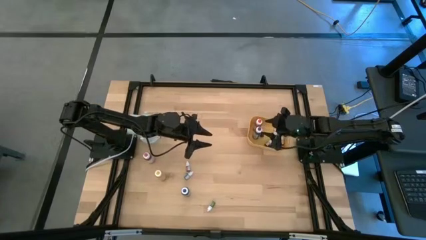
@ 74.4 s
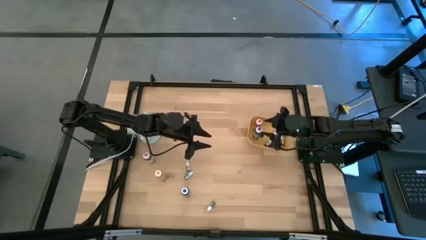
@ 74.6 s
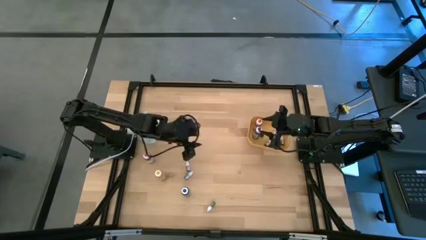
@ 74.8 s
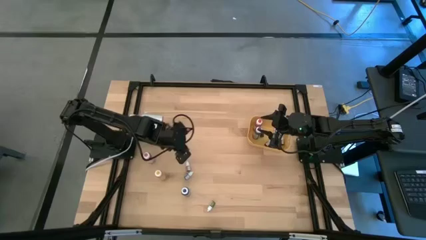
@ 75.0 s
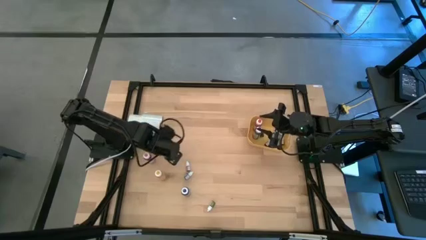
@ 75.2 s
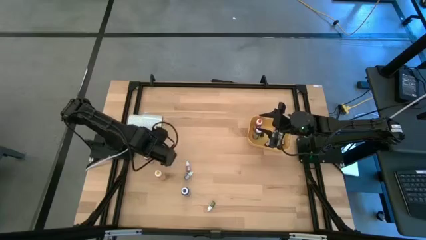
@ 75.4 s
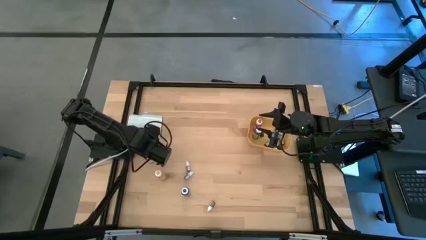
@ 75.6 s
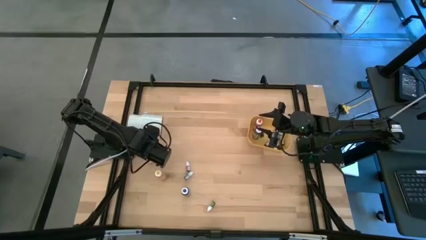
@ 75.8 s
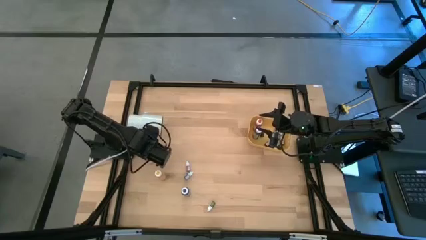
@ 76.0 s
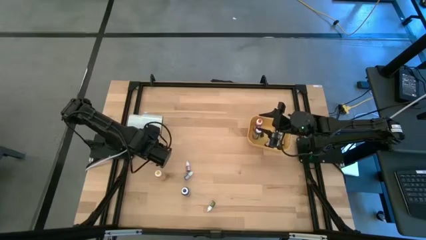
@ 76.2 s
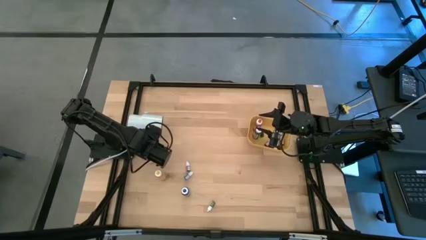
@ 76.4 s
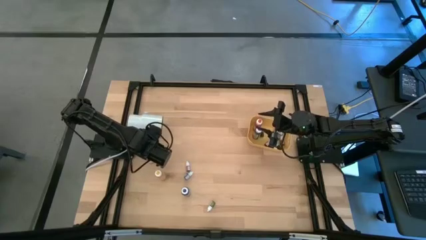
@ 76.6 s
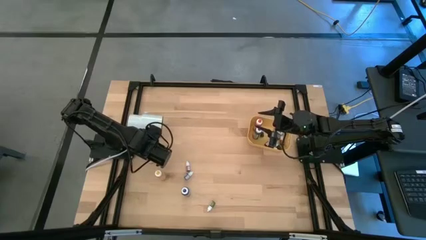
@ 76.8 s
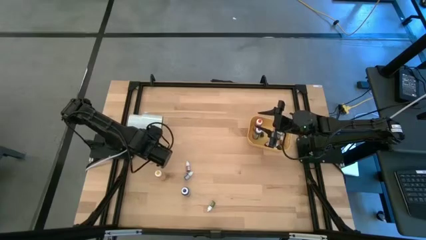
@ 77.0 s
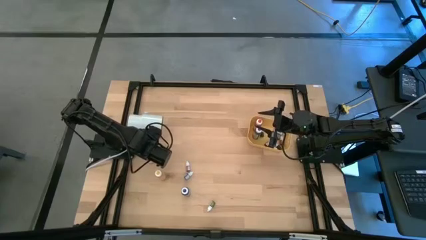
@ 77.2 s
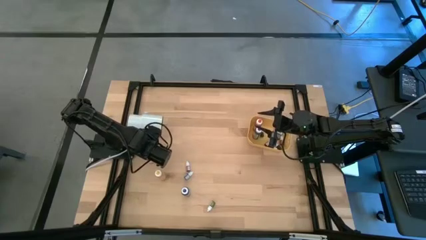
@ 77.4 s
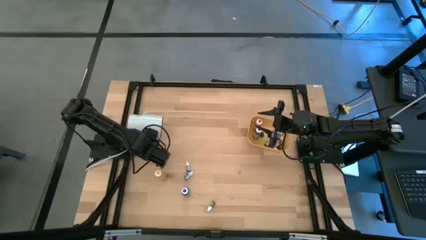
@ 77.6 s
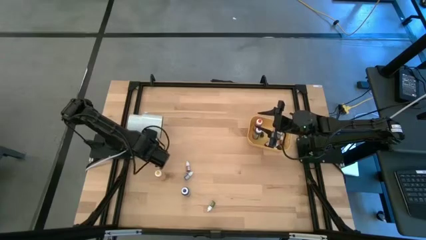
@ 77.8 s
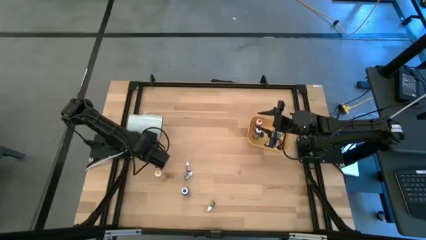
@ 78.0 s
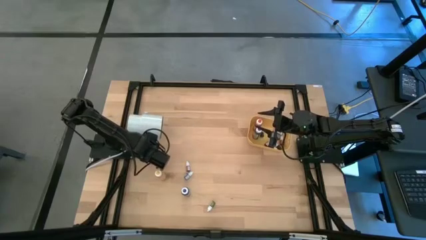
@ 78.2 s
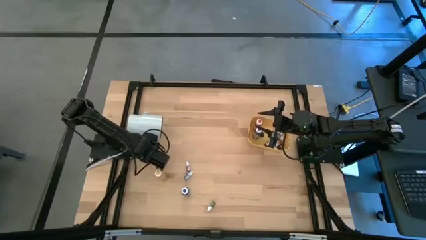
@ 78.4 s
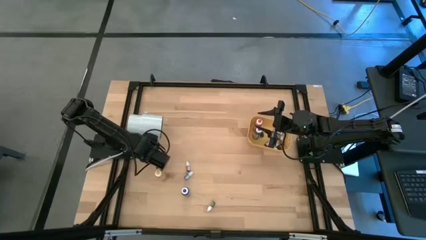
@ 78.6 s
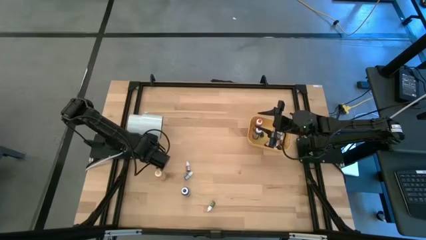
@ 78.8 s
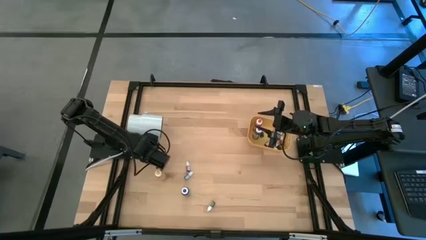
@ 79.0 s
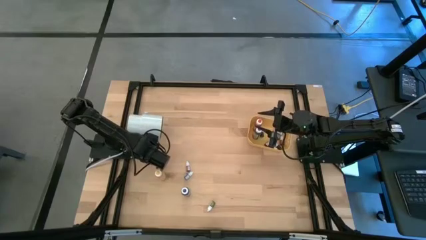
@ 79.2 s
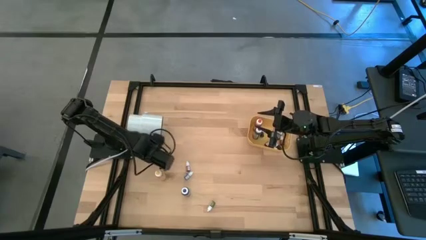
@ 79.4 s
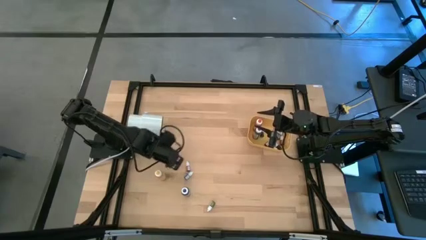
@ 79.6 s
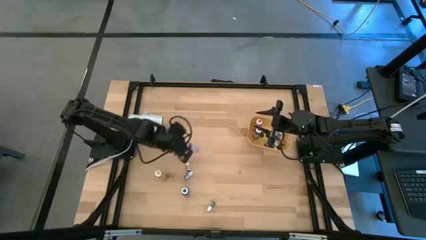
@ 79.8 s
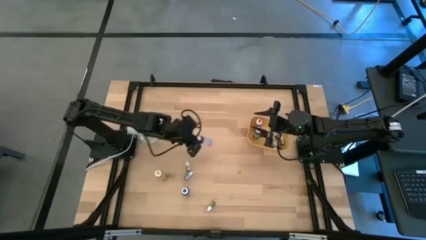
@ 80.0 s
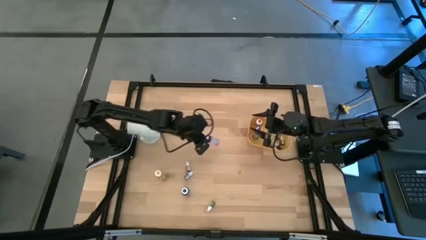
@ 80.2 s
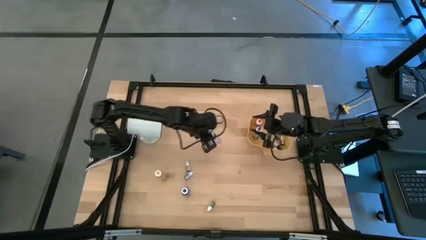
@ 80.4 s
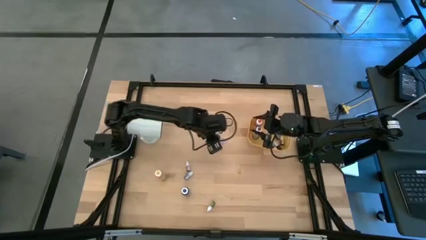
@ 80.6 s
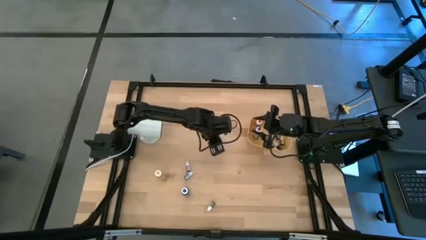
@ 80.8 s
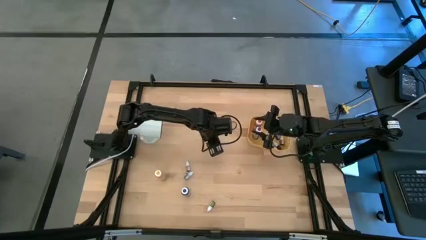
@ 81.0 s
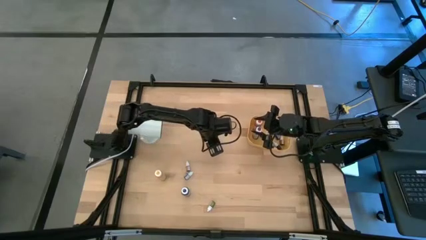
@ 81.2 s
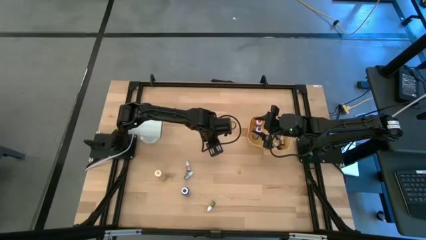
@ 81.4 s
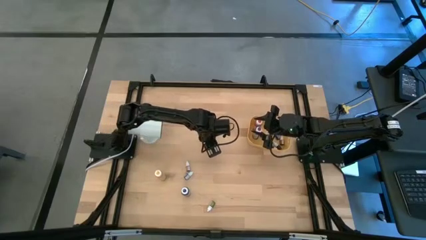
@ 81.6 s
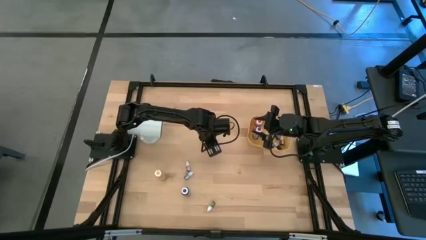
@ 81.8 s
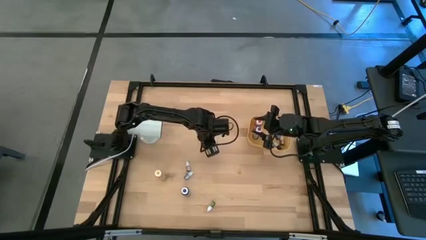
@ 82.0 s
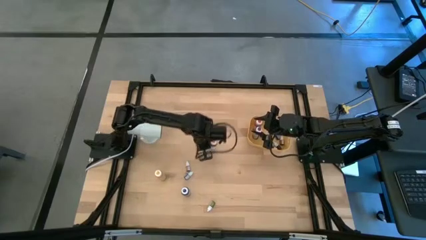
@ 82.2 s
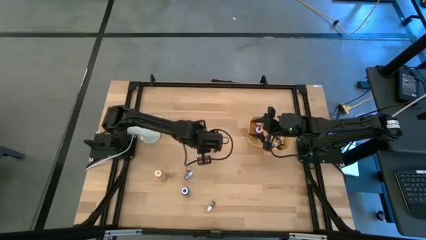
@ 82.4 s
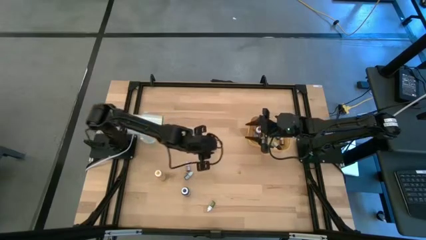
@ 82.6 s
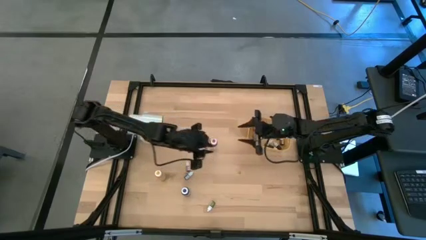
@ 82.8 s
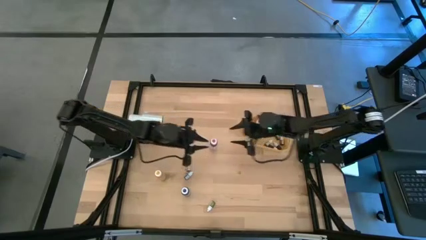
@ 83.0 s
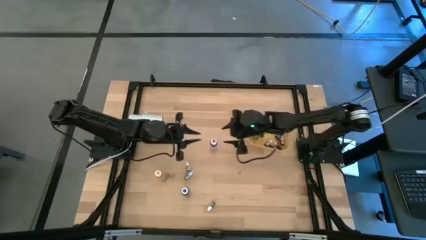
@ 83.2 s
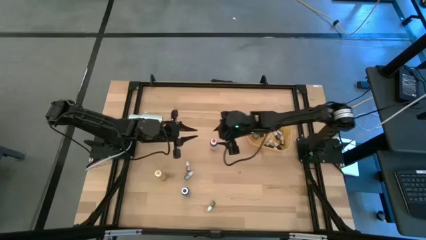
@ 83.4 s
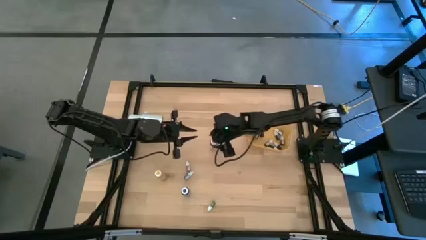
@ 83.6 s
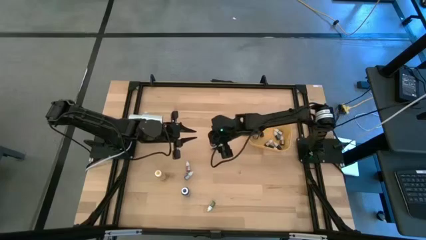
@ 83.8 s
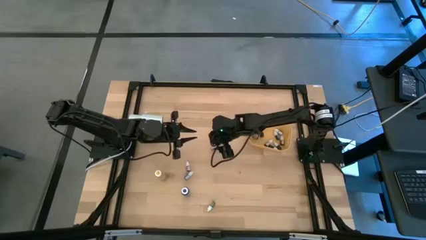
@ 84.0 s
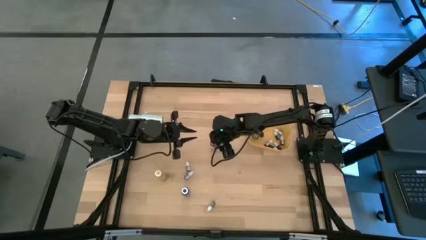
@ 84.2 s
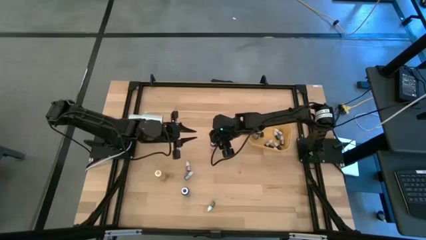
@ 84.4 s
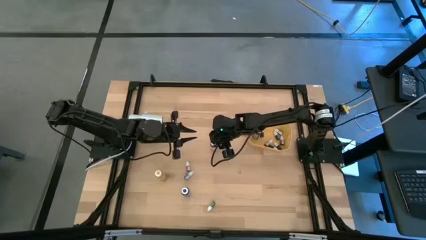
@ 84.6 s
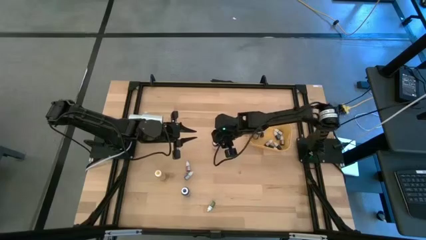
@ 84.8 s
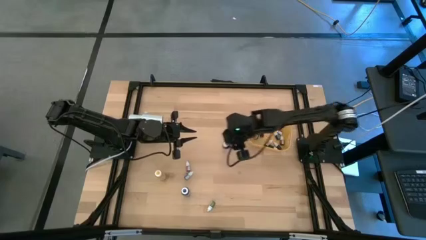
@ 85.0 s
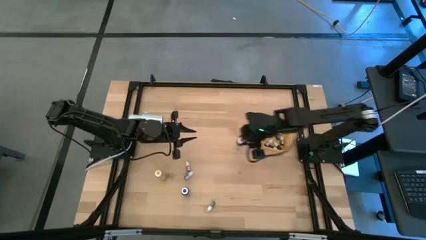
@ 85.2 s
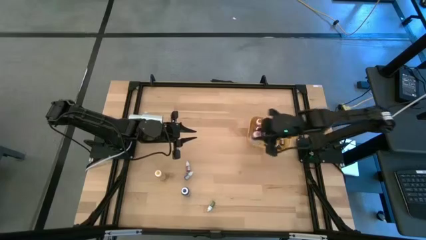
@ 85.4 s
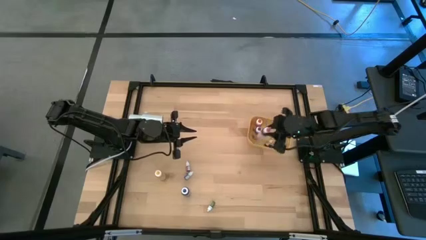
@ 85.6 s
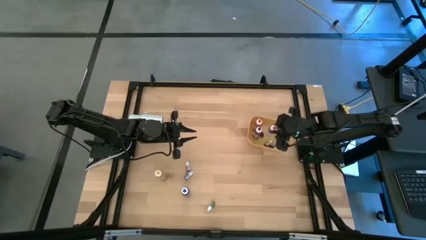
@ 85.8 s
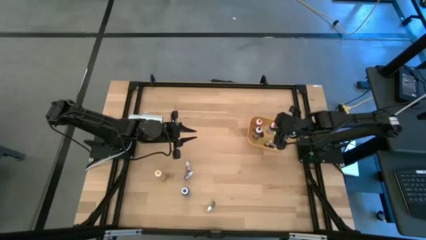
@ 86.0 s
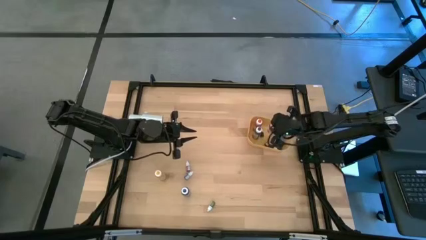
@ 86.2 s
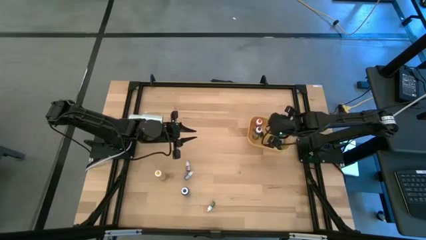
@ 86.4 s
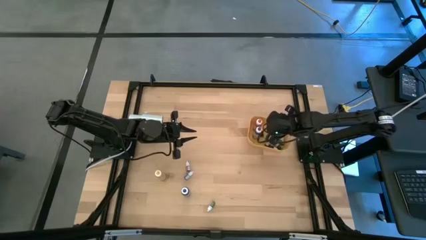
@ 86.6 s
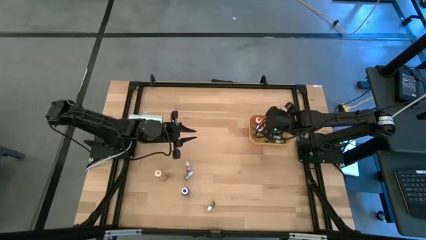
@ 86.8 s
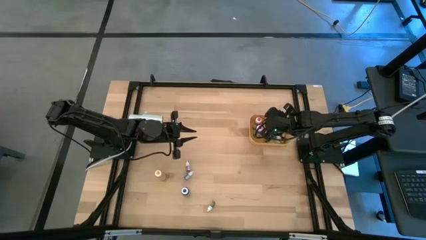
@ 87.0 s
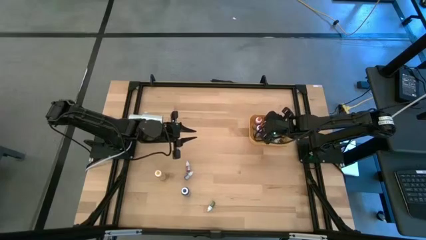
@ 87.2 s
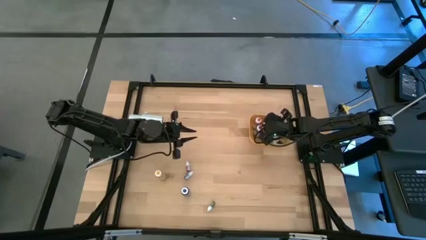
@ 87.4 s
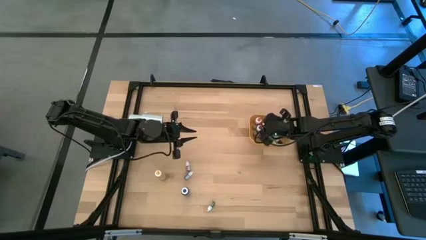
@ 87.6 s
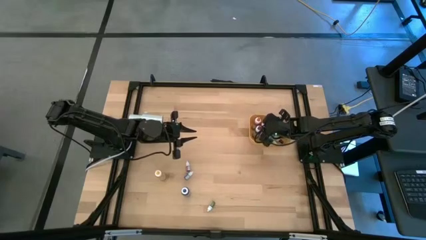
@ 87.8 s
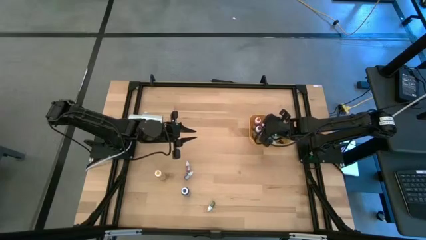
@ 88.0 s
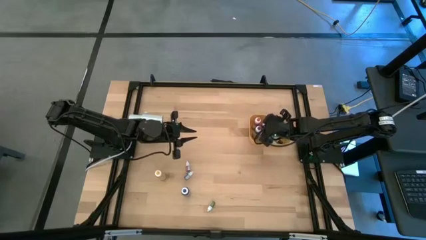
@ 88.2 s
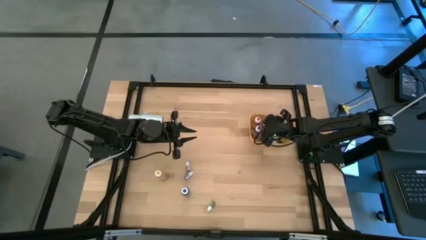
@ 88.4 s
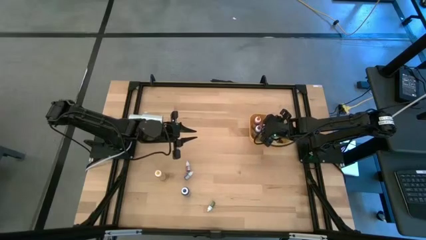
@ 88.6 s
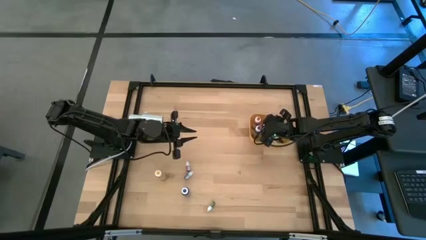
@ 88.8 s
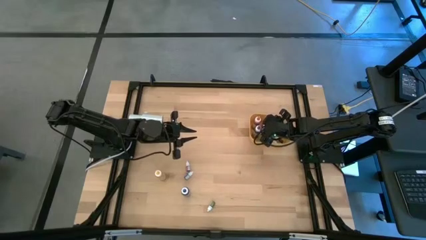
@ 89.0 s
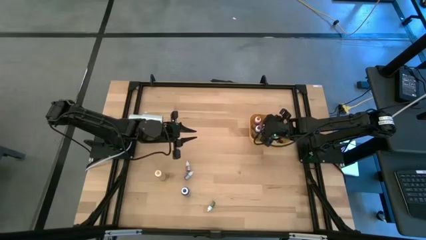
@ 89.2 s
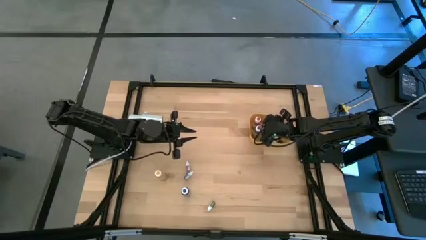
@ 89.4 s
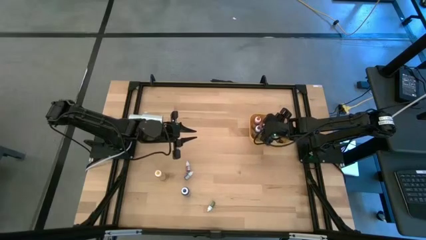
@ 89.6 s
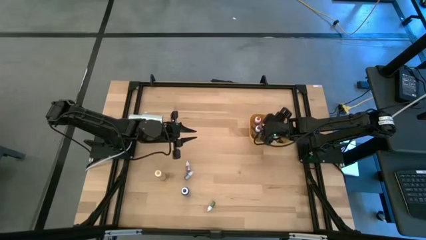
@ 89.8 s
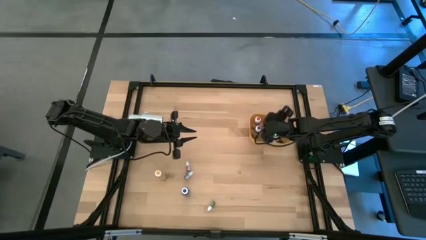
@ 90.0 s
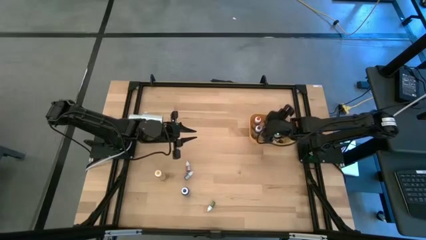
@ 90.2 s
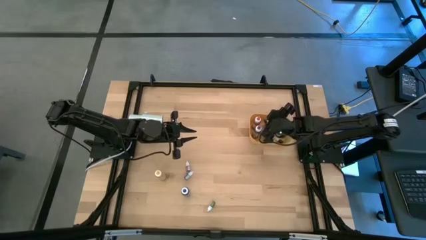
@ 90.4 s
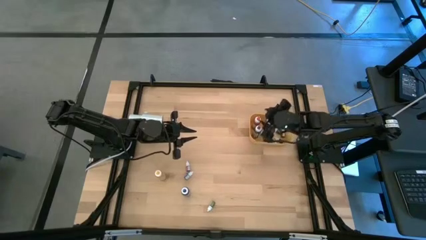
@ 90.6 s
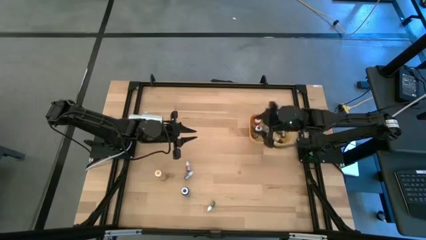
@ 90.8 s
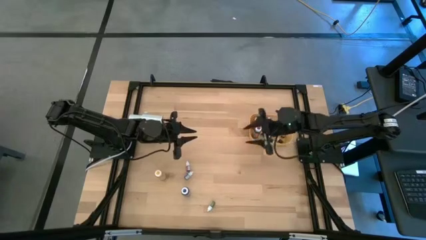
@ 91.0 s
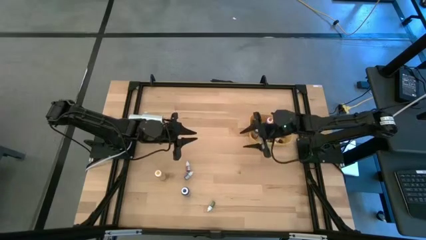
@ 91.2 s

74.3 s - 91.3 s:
Task: Pick & Place food coloring
Put the pink food coloring into the yellow bin
